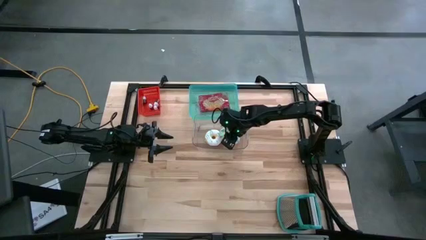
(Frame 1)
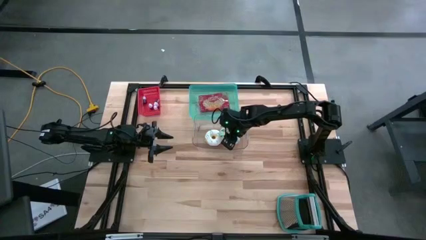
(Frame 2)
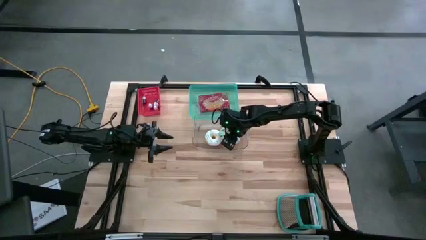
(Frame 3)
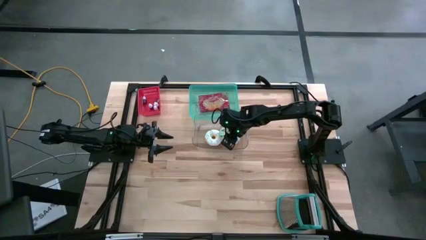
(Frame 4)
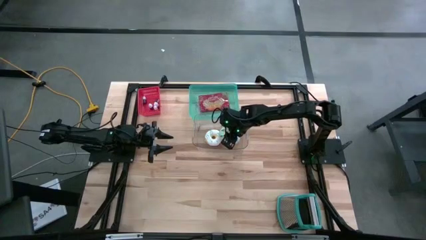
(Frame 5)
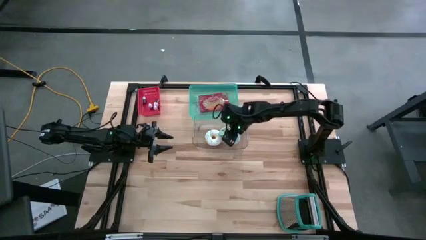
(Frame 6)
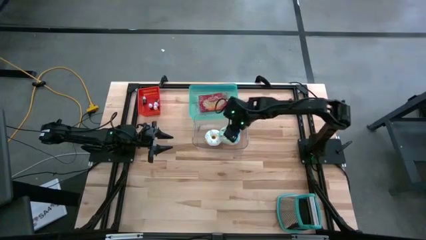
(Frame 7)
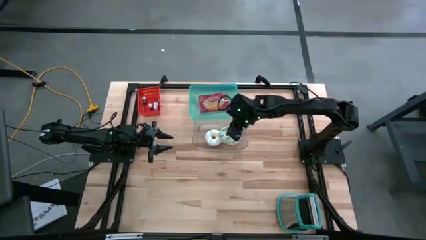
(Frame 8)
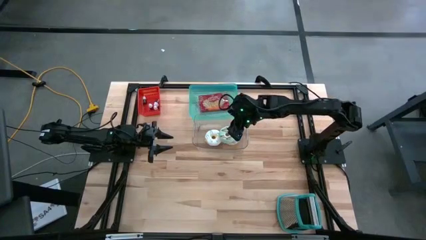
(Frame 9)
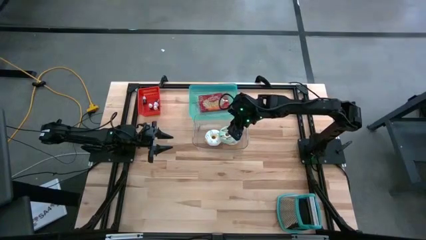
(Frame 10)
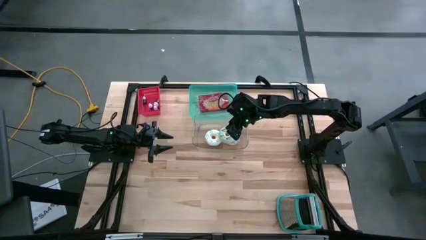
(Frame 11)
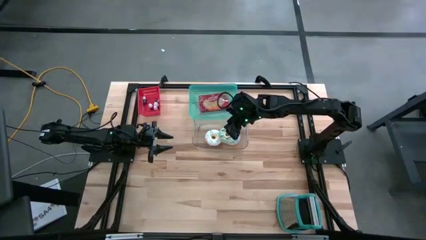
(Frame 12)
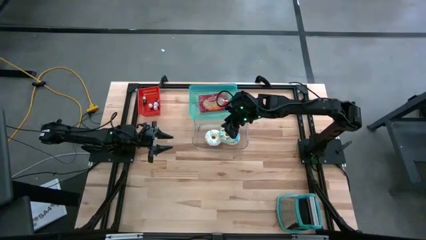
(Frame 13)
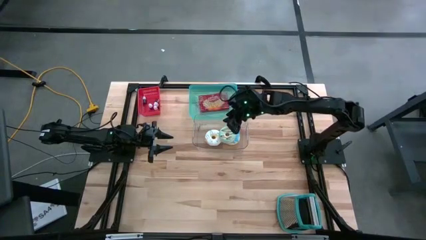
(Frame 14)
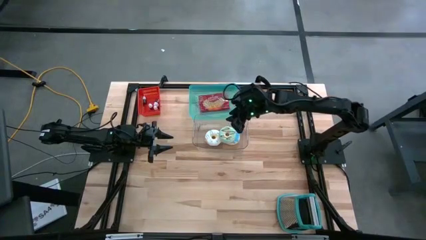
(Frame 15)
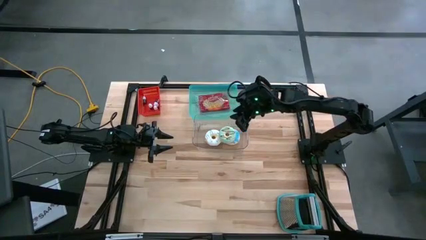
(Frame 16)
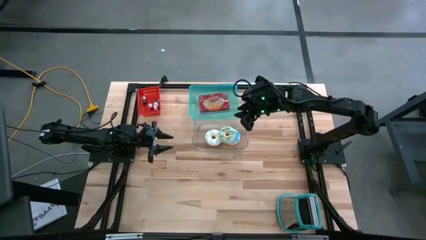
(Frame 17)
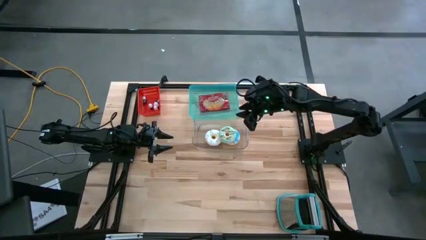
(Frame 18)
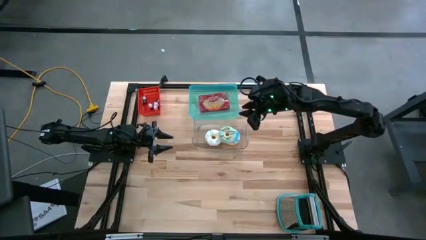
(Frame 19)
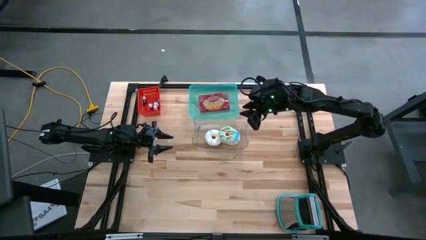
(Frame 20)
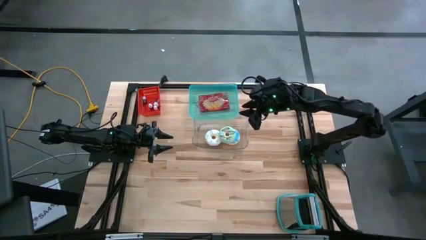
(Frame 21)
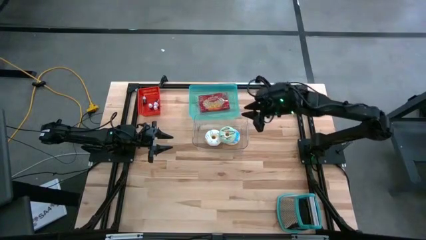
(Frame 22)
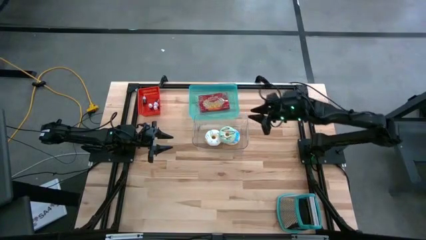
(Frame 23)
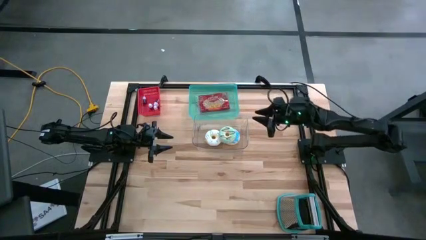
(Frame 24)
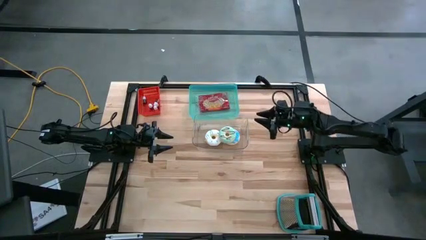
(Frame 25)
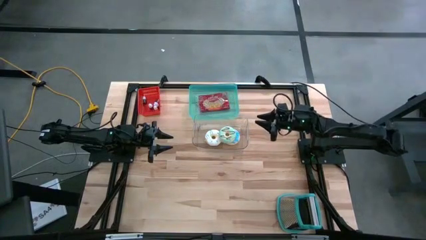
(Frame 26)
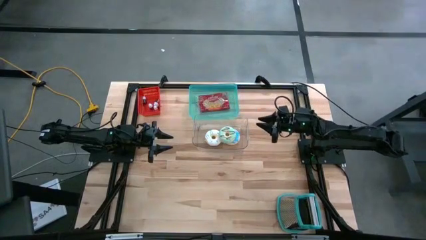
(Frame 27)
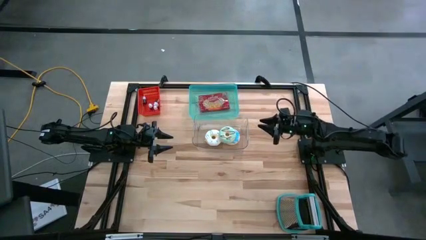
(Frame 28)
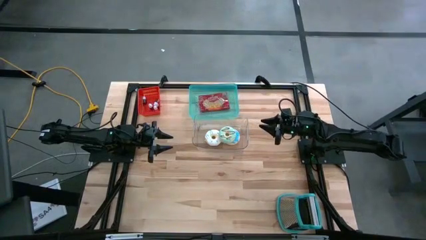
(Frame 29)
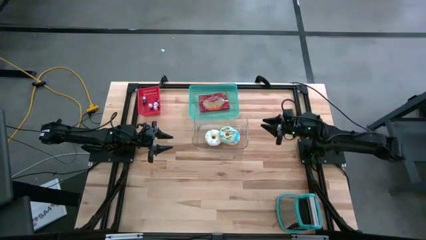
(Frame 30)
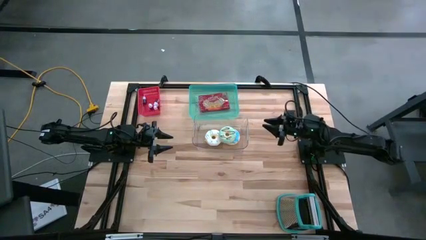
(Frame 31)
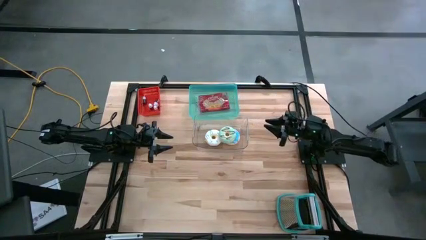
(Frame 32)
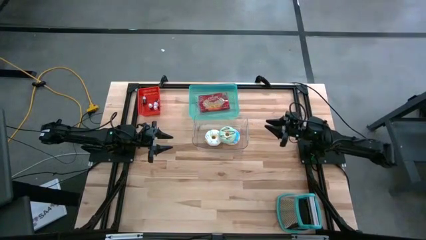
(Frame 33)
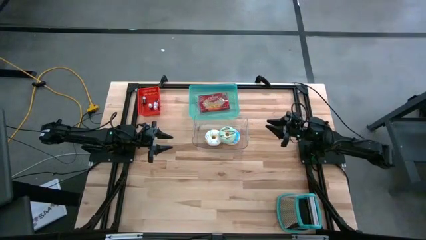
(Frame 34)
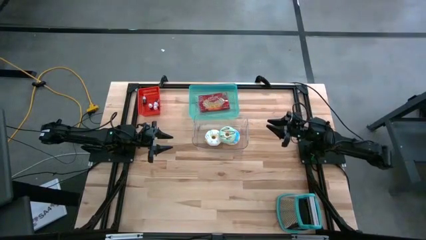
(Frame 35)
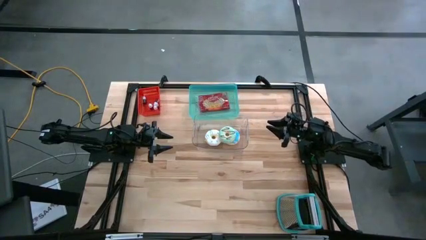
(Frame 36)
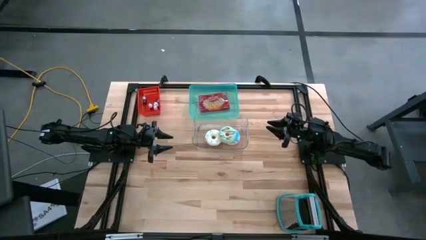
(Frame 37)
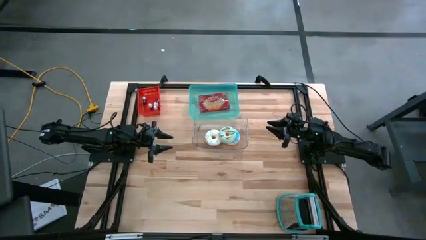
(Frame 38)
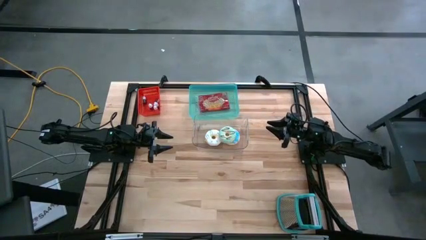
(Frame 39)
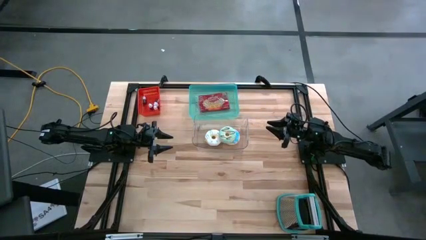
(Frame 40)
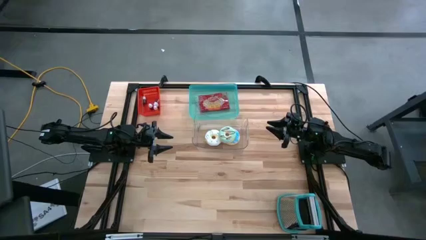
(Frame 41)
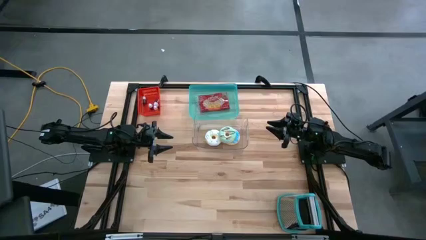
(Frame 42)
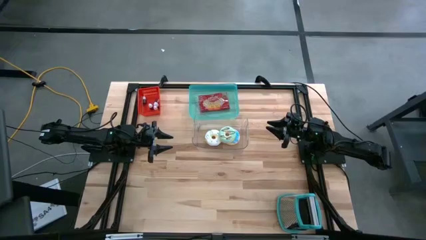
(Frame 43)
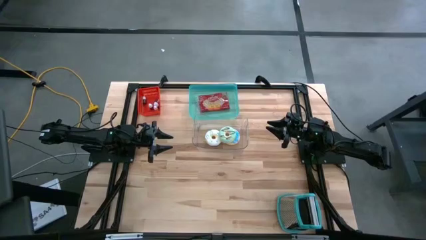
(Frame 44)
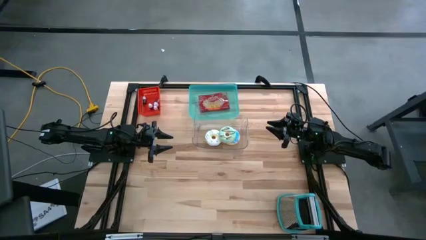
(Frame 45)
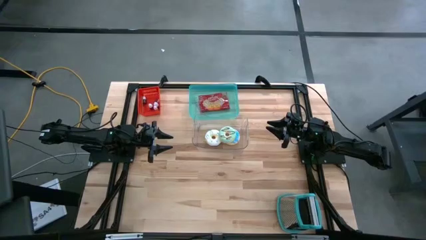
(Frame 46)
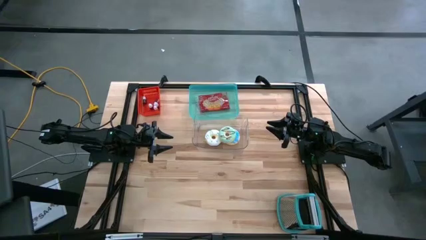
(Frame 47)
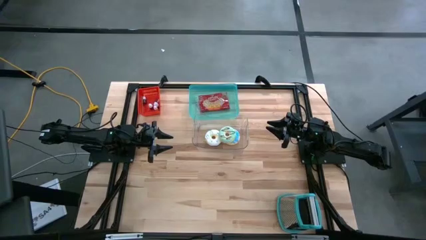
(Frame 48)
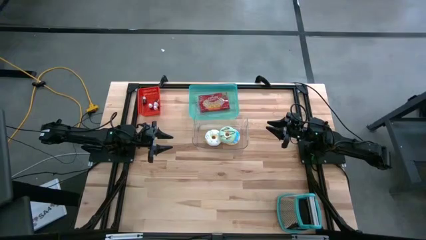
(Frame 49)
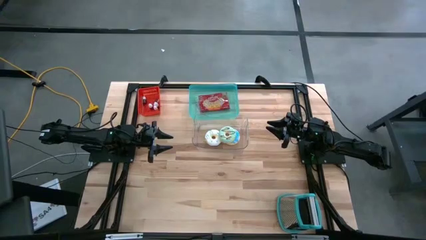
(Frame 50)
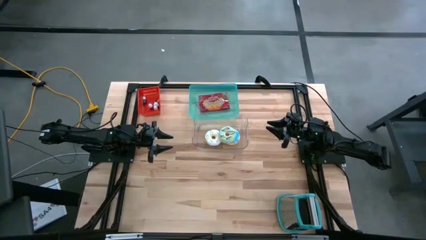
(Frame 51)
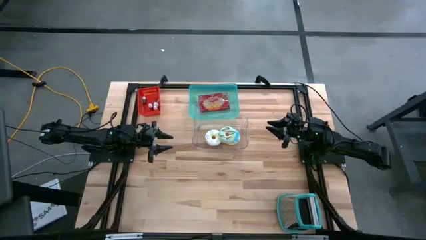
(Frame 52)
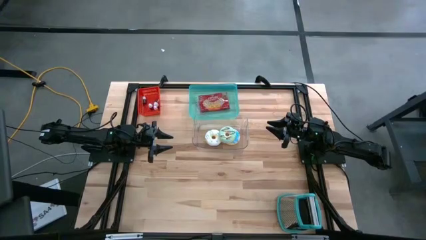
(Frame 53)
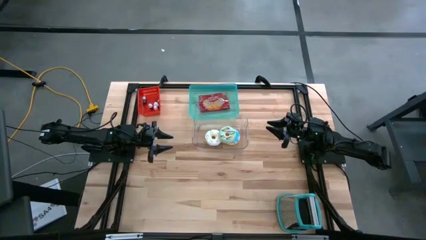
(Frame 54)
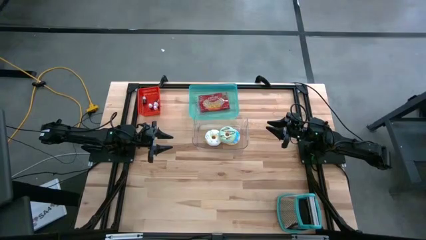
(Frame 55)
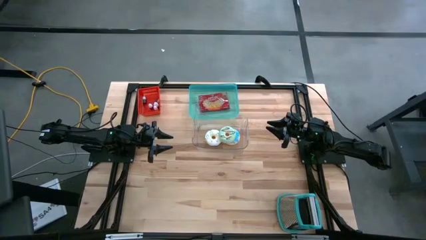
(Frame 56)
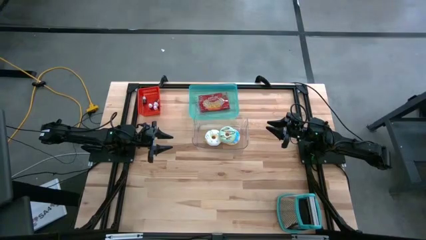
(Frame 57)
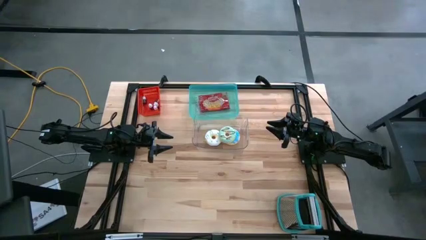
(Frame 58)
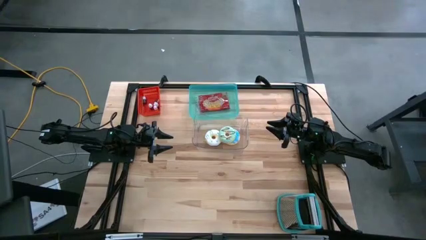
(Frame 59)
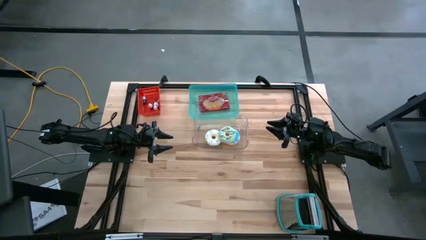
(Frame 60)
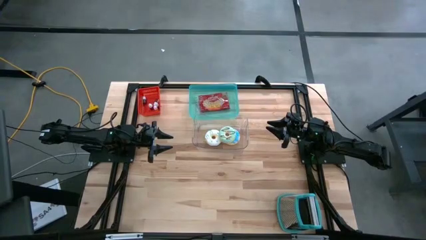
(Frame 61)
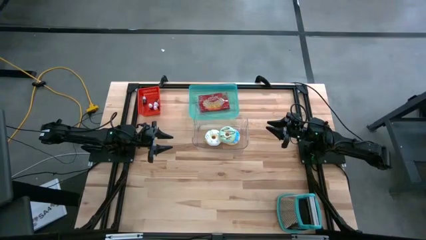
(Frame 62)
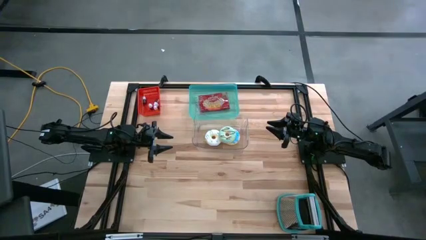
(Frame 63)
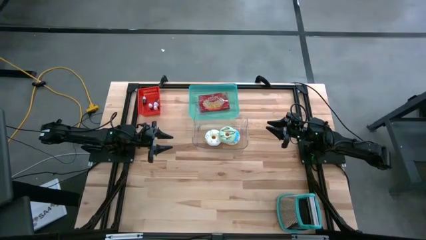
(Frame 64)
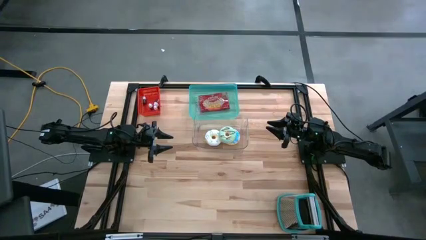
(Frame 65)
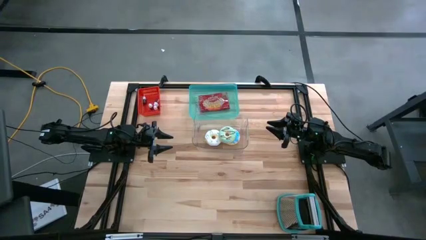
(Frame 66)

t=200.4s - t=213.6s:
Return to Home Position
